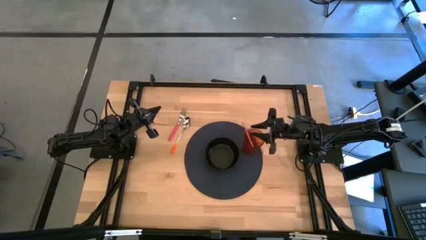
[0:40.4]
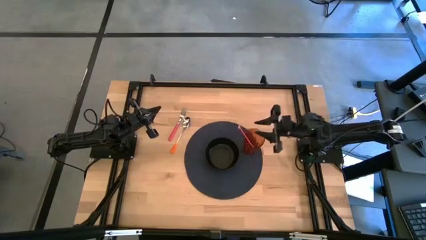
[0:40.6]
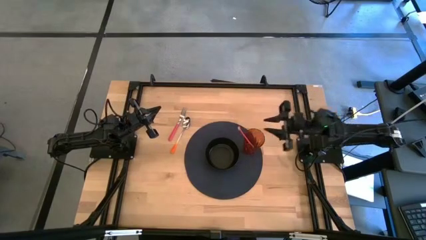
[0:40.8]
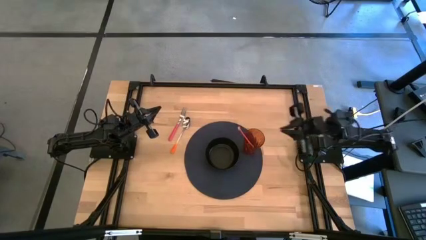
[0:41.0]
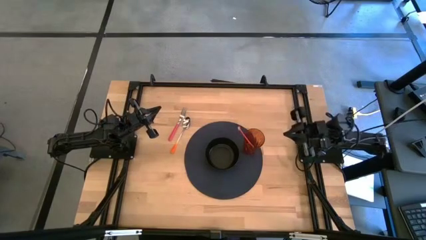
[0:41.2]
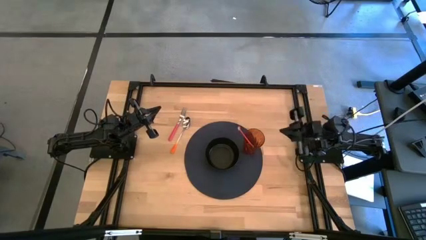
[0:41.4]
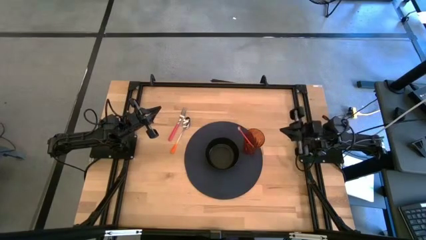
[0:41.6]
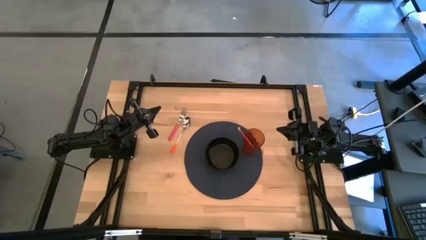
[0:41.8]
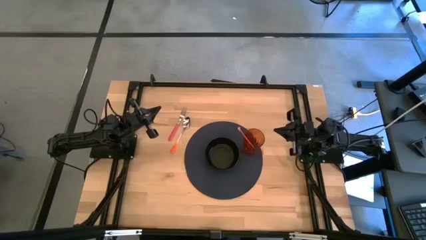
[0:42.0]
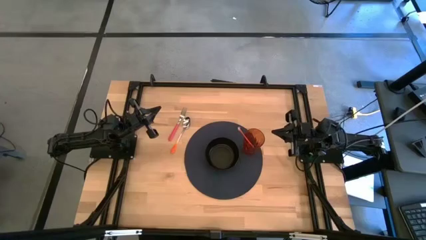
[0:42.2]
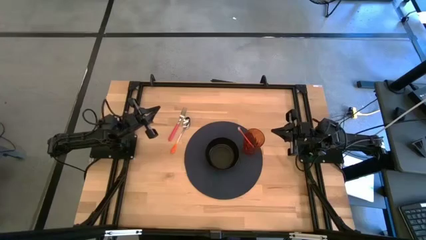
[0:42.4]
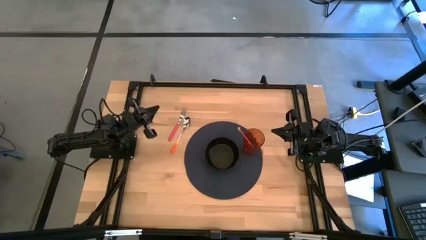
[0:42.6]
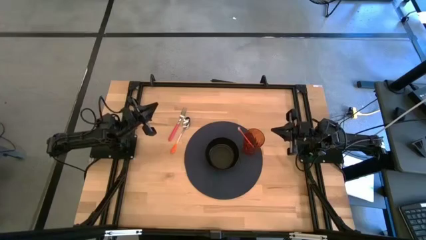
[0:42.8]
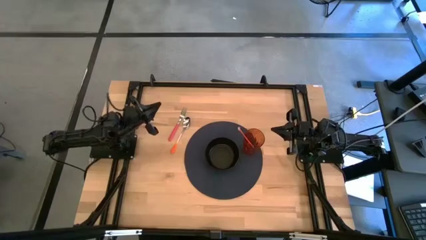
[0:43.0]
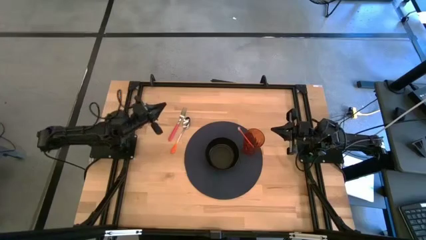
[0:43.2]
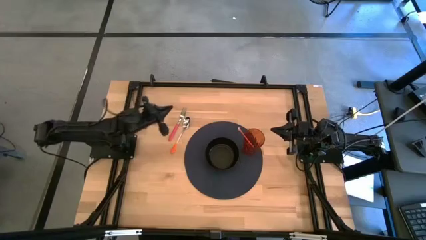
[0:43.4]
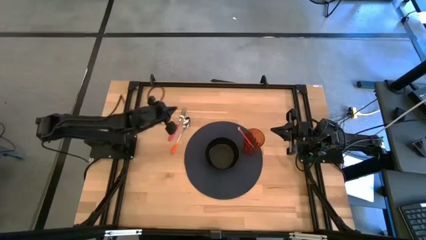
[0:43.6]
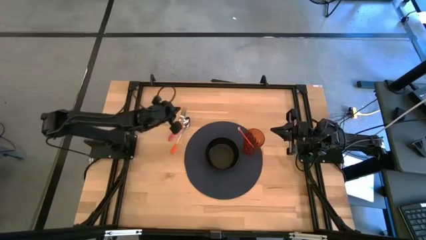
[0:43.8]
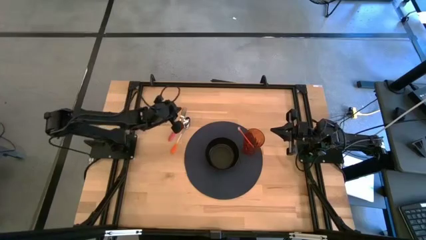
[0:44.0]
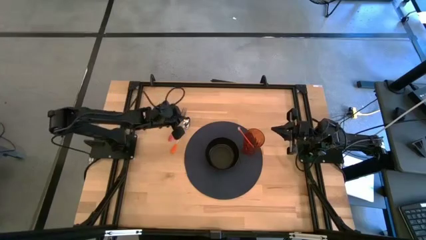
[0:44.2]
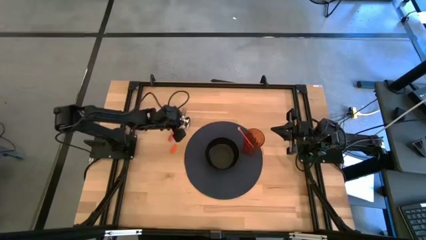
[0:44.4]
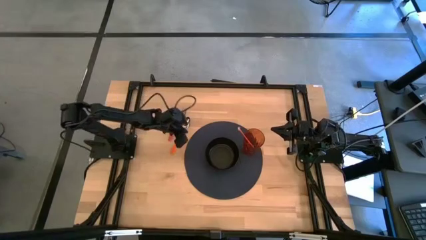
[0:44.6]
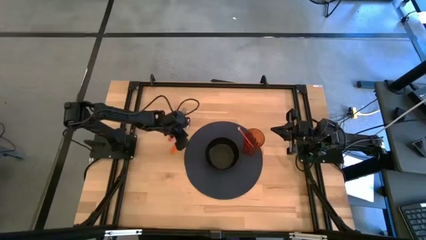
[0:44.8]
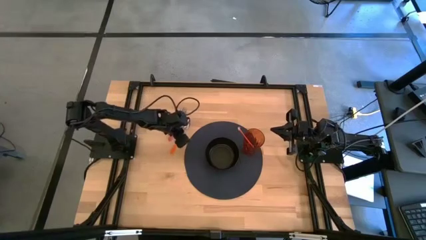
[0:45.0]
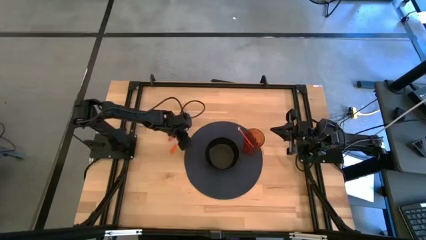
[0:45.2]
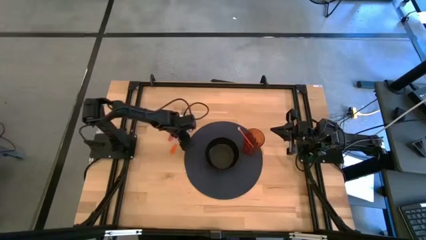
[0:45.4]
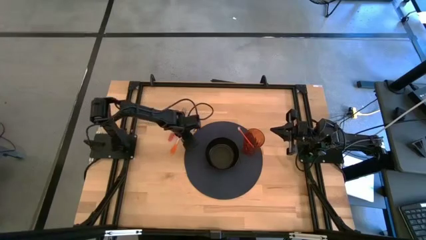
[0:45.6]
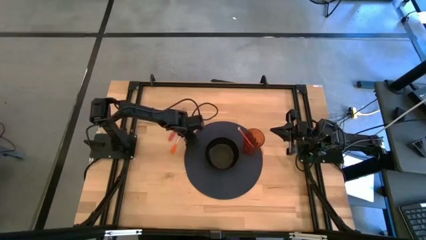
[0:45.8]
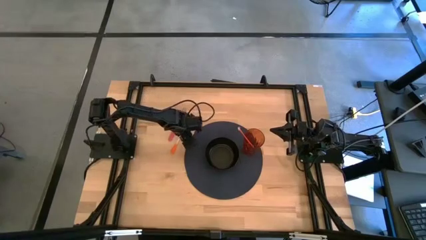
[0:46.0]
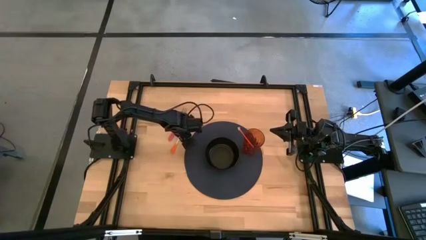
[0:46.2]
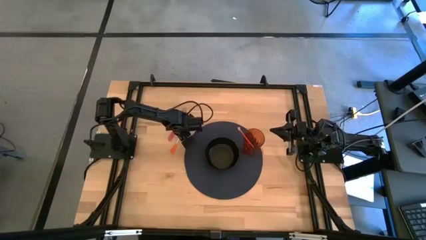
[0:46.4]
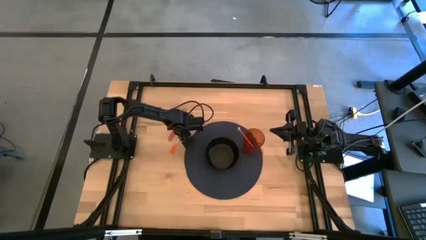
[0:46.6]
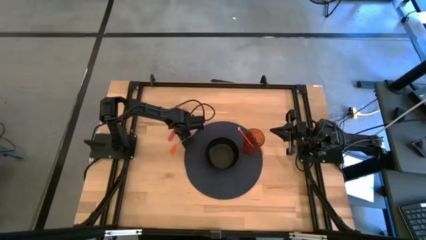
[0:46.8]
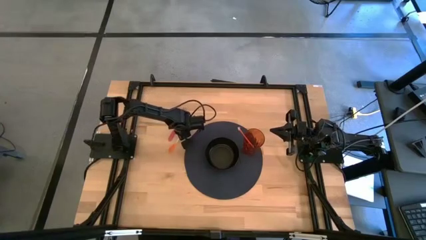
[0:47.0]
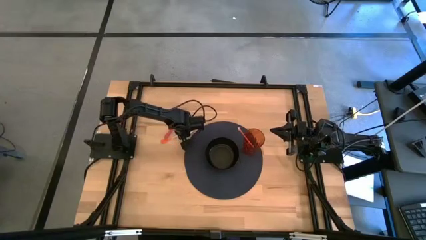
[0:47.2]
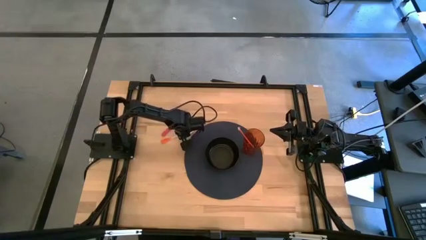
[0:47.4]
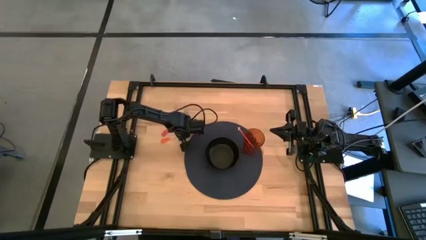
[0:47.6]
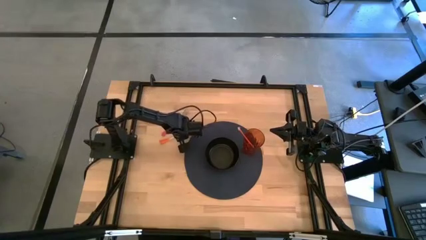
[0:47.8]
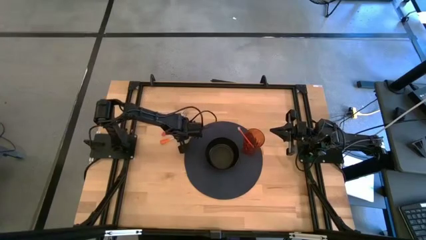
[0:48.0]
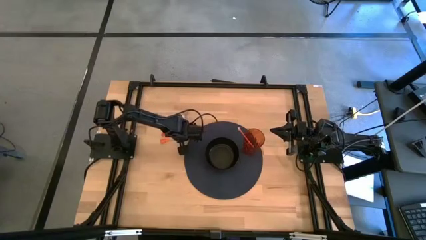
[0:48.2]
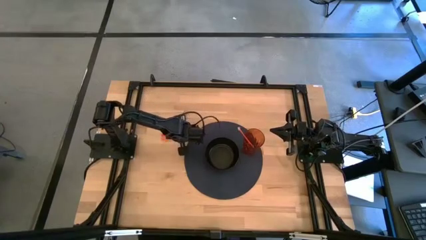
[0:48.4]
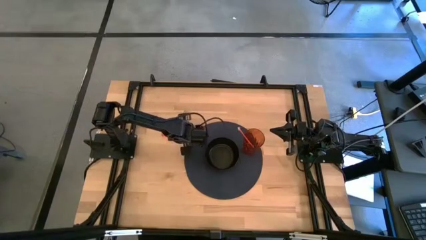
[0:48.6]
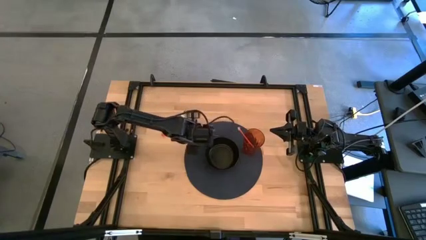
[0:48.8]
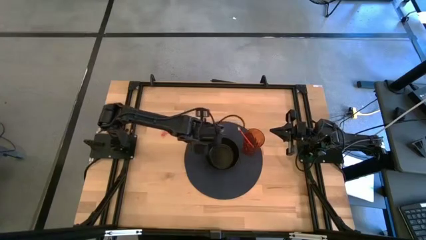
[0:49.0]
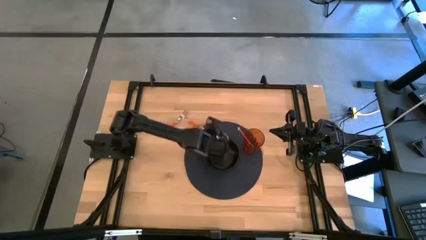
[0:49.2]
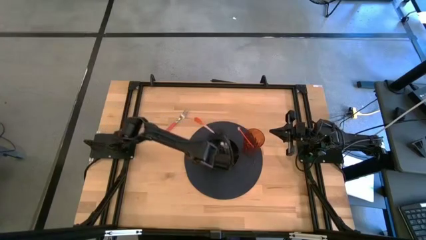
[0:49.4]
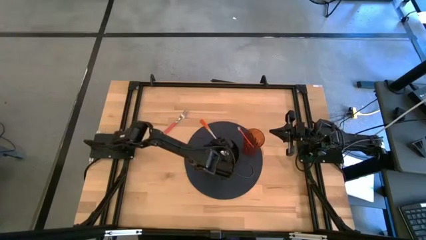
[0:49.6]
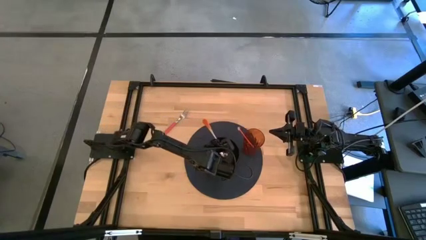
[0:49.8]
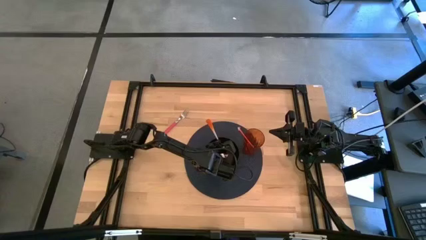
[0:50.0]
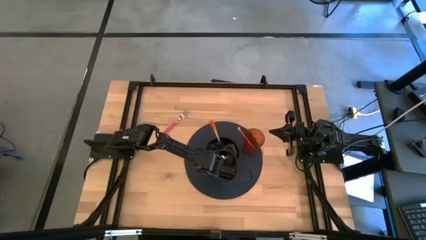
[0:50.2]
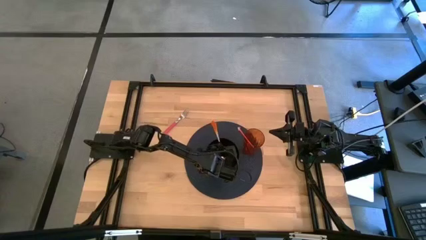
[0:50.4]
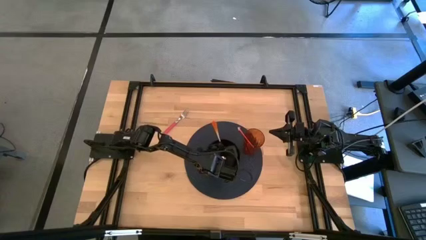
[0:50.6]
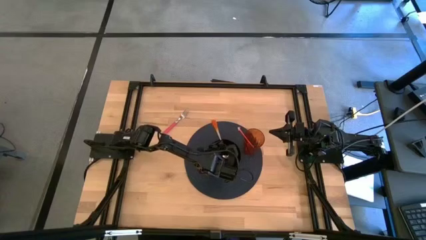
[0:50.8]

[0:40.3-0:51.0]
Task: Pick & Place Utensil
Put the orange spoon on the black bowl

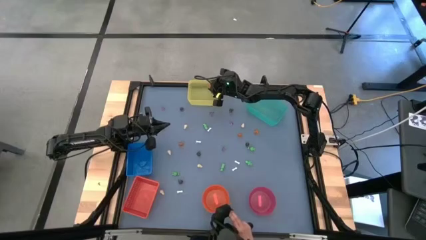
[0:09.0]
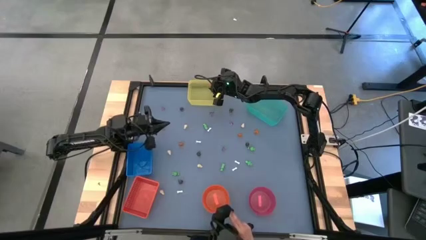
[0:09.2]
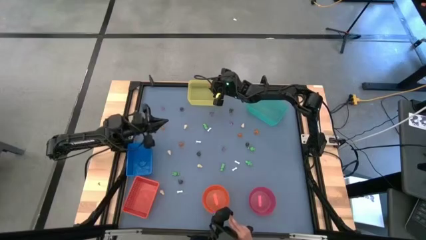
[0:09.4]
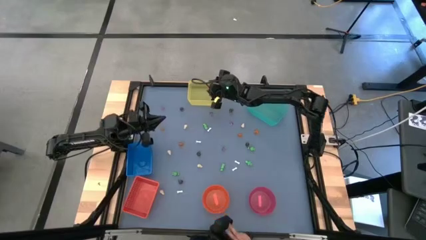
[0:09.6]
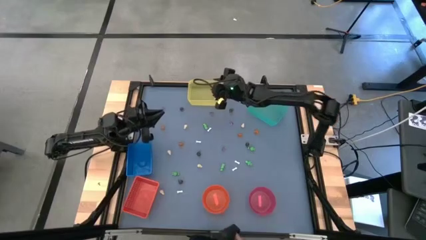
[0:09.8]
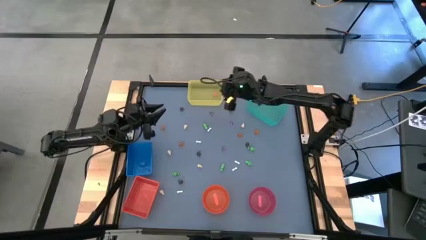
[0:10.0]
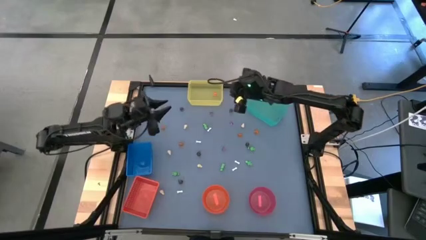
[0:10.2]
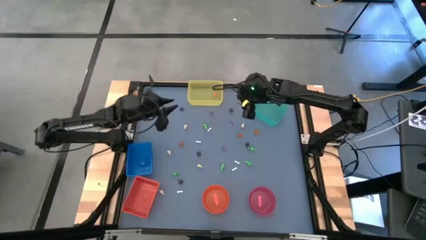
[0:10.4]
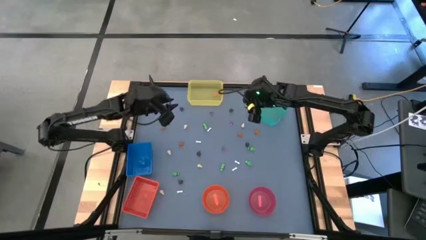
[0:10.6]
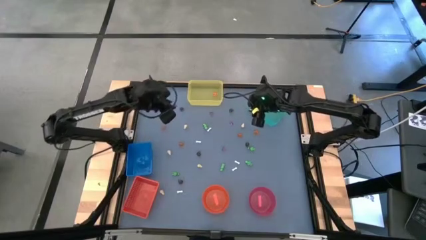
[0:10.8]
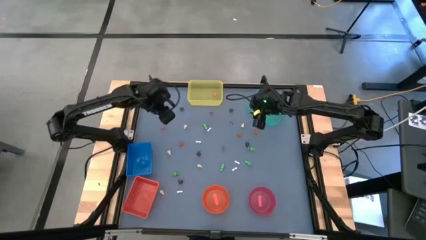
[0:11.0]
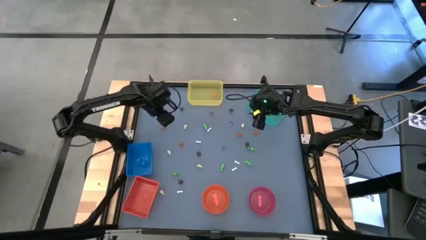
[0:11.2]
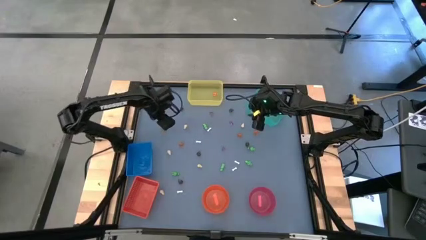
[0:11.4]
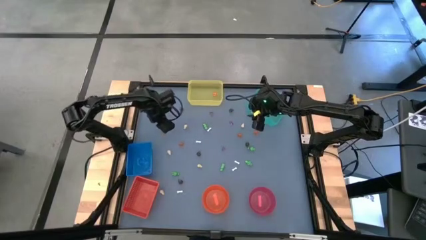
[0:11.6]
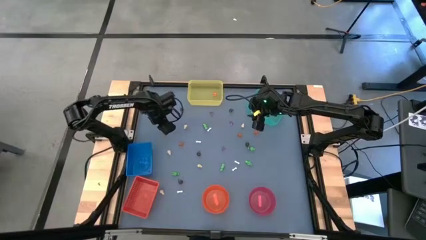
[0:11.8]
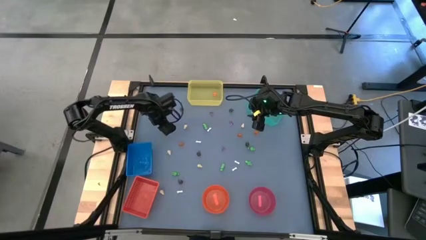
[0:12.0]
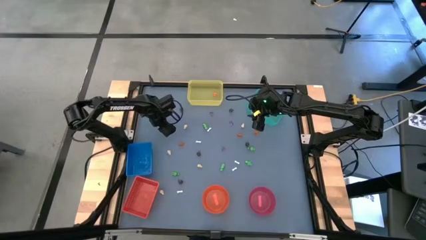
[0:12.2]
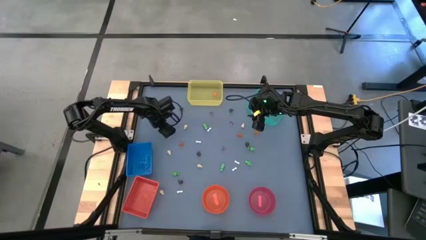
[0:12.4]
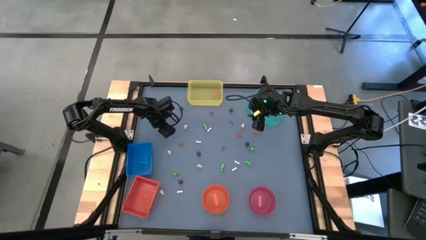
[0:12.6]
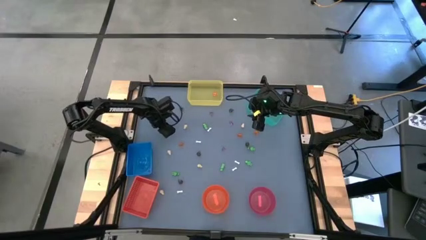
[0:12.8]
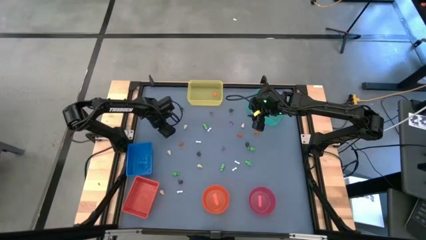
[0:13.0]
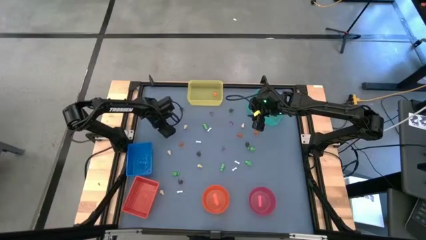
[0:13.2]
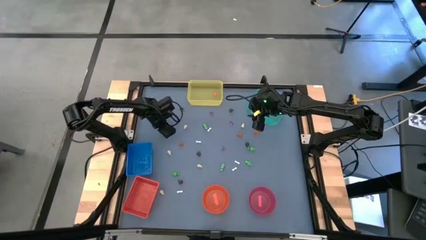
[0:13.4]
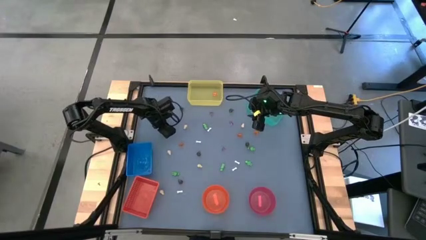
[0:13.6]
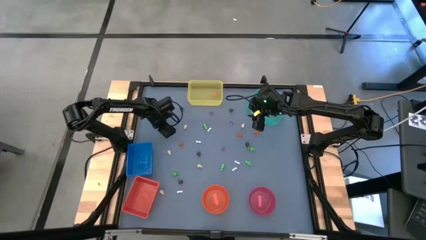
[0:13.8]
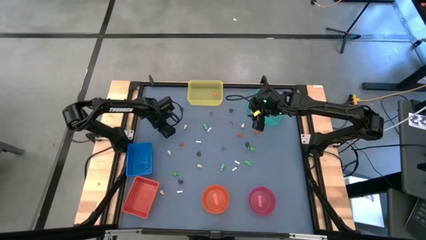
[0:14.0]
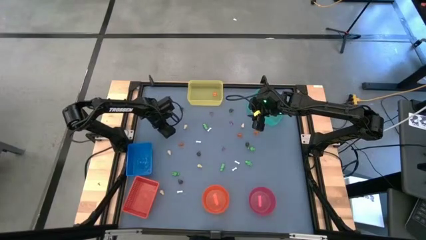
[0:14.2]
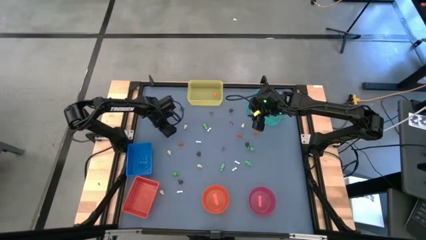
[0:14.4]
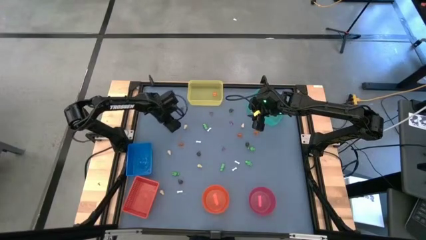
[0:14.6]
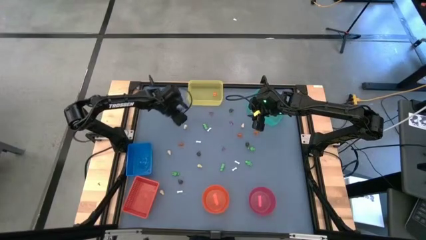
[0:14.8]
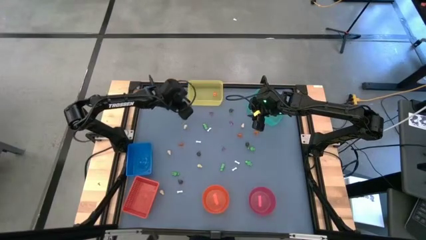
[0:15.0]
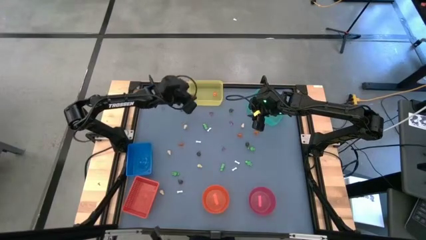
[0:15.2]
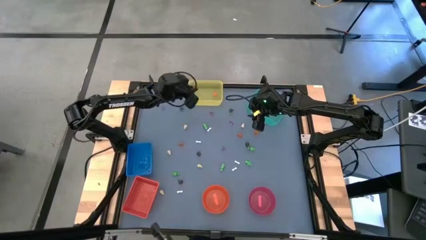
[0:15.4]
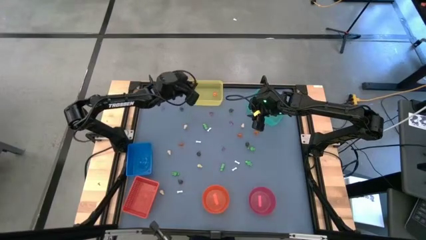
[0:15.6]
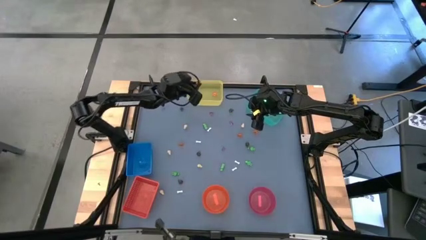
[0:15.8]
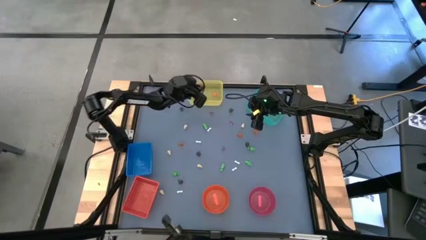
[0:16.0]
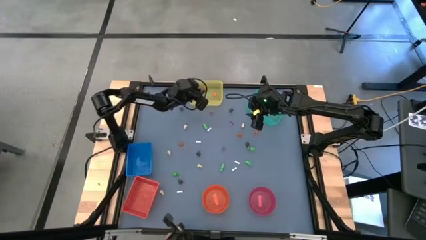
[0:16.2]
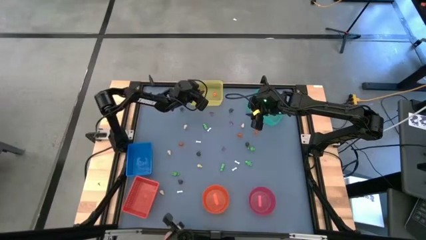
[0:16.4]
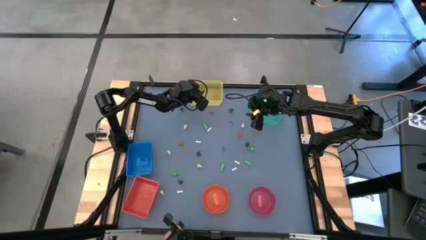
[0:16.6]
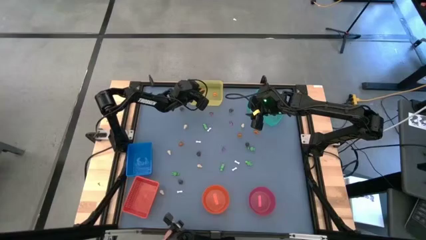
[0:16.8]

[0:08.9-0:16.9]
Task: Sort Halloween decoration
Put the orange pumpkin toy into the yellow bin
